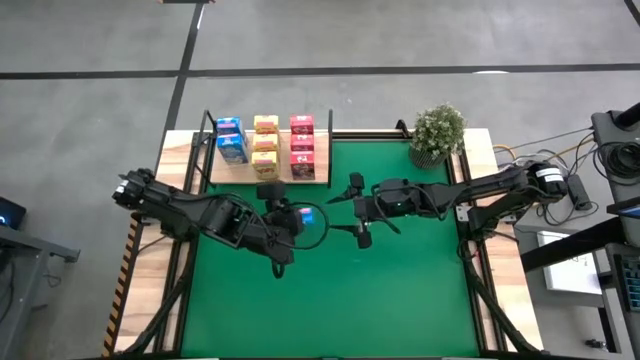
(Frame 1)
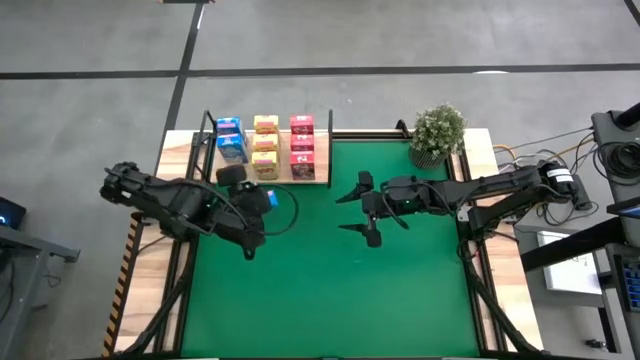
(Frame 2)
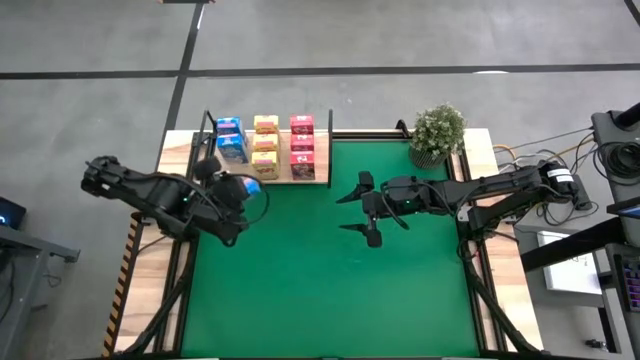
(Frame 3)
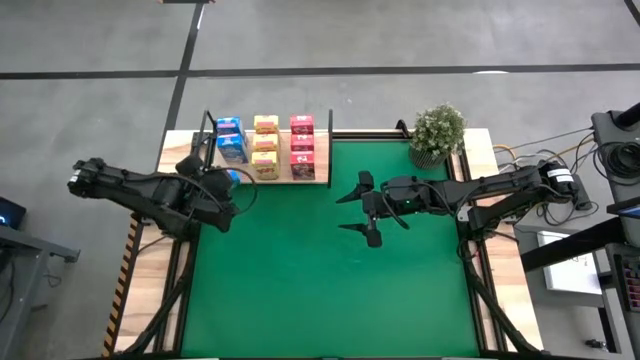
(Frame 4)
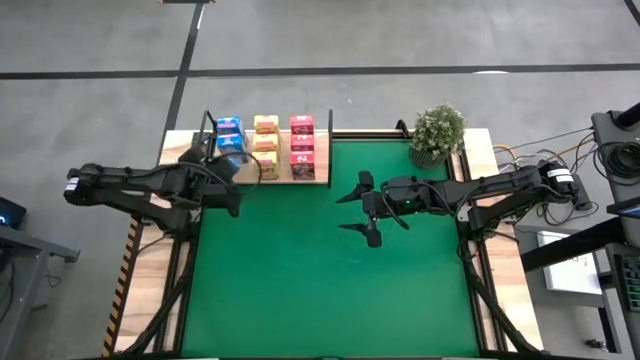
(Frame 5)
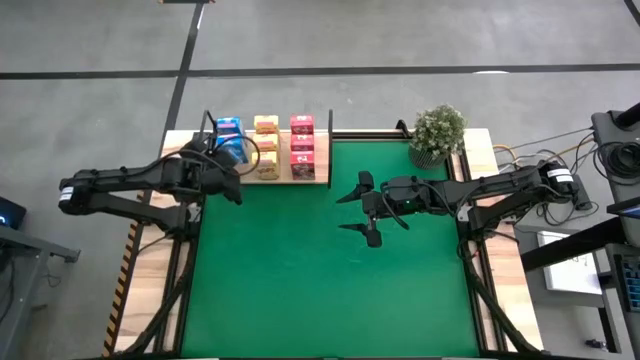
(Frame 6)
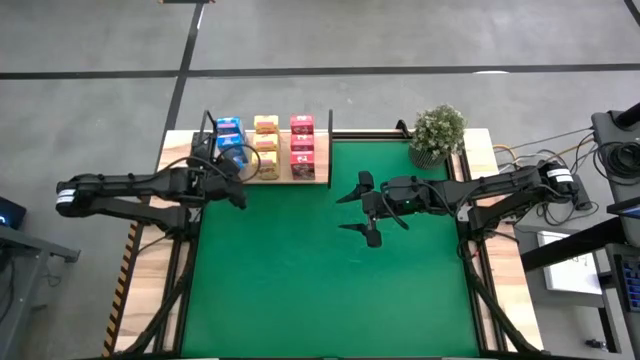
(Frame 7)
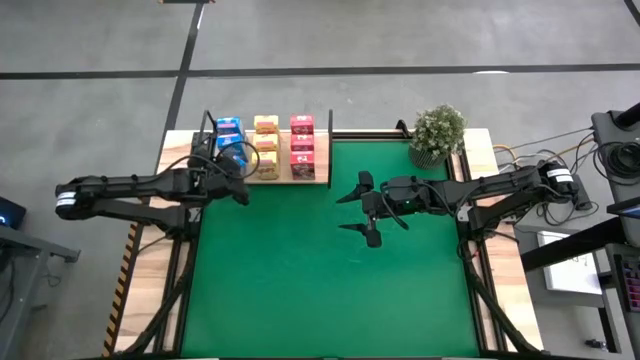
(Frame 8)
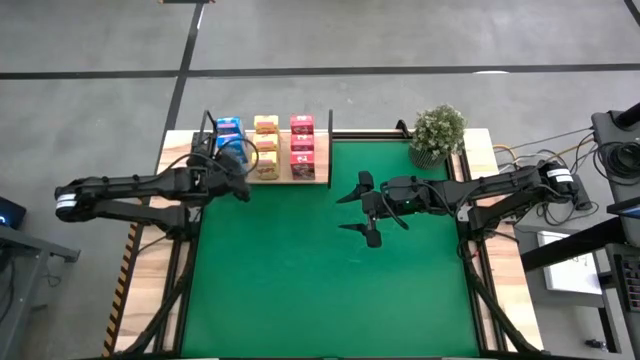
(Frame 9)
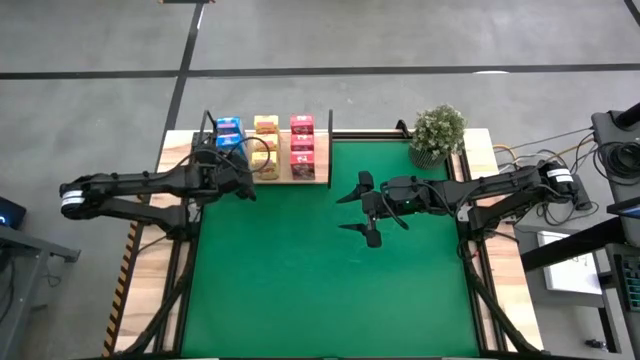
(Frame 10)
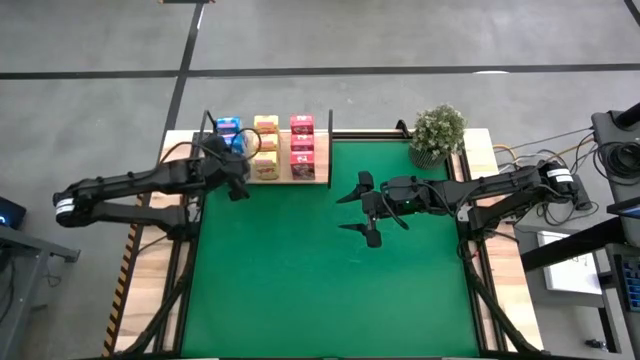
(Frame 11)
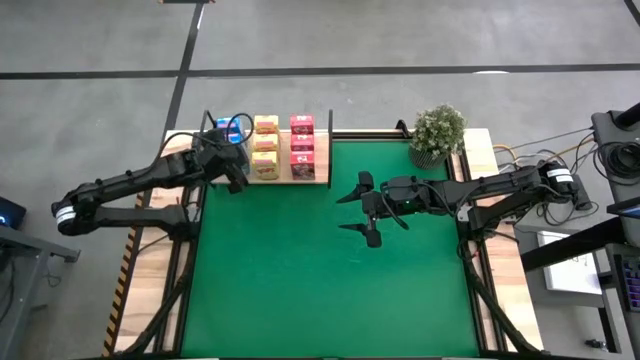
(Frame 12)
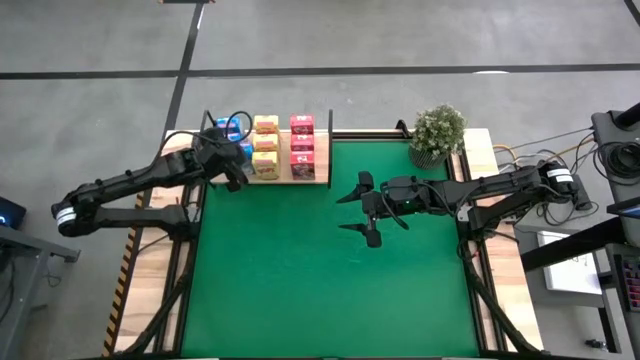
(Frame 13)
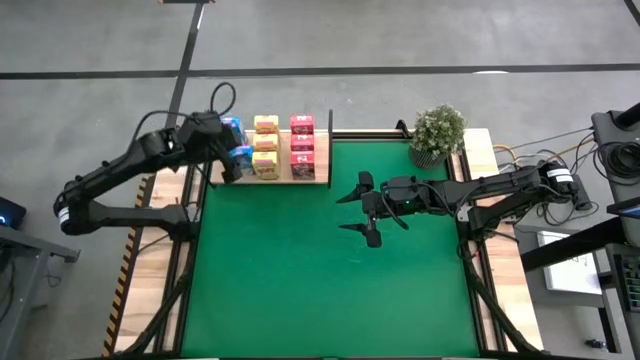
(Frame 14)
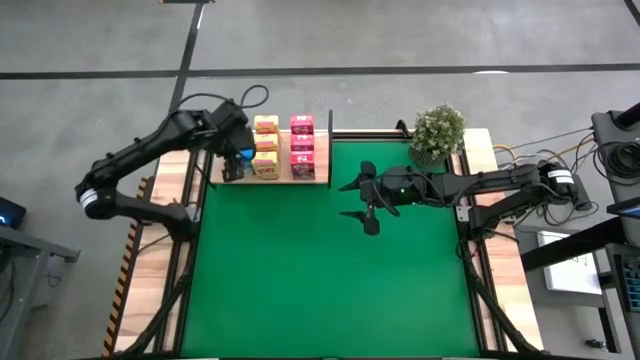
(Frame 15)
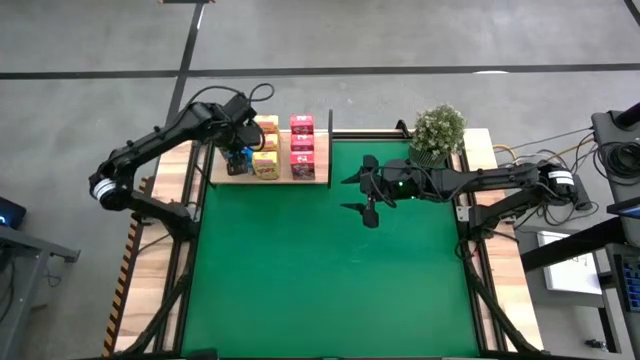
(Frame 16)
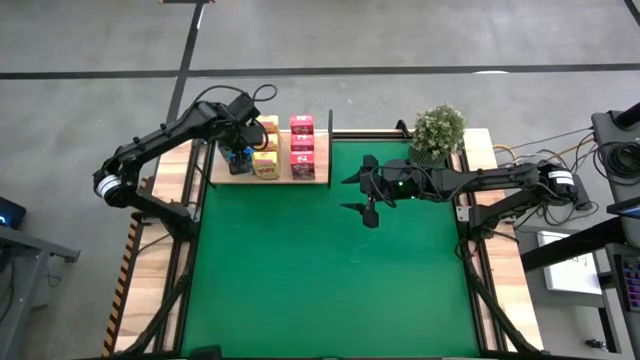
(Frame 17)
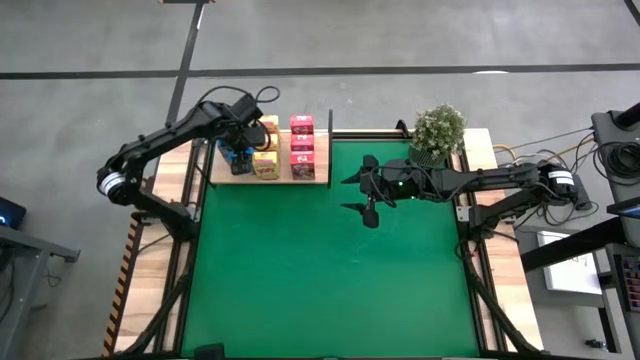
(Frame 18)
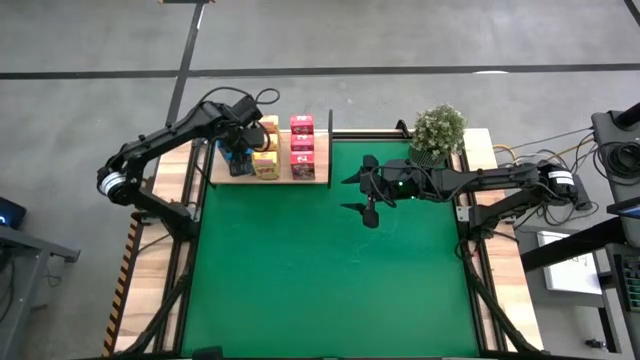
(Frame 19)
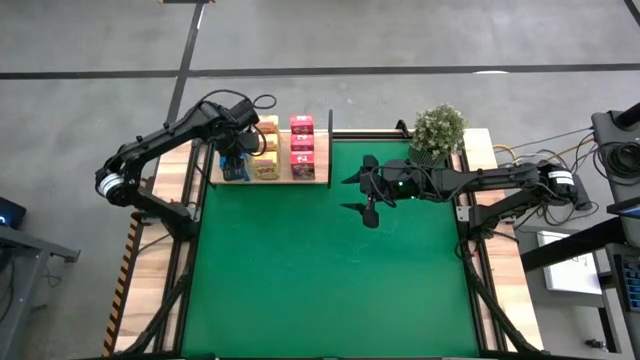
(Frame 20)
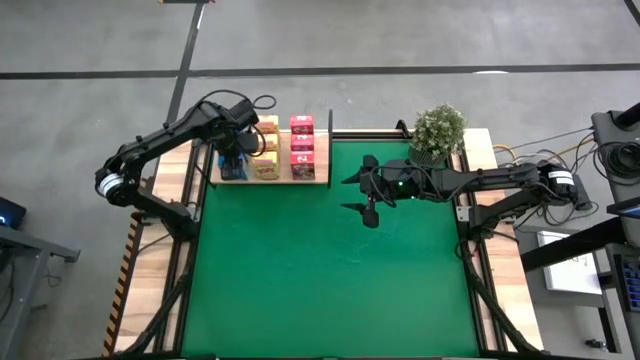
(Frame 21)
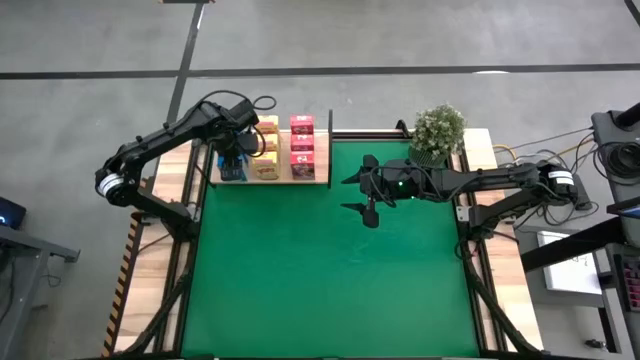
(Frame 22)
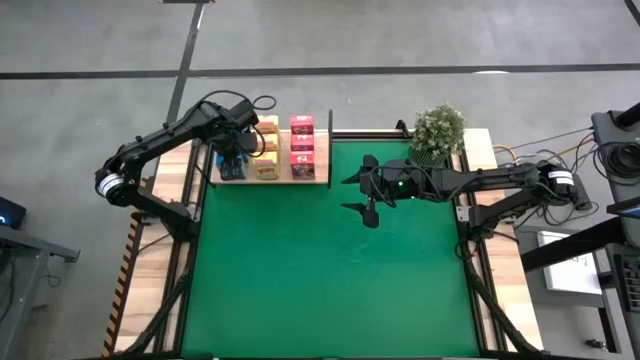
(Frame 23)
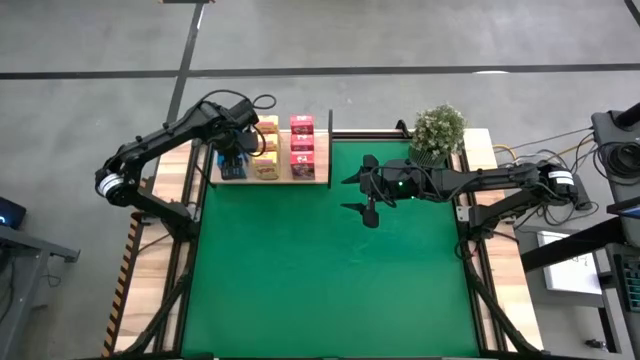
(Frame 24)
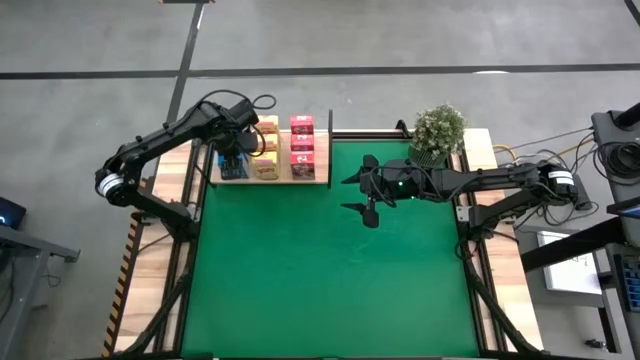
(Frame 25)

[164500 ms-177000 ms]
Task: Stack cereal on shelf
Put the blue cereal box aligned with the blue cereal box on the shelf

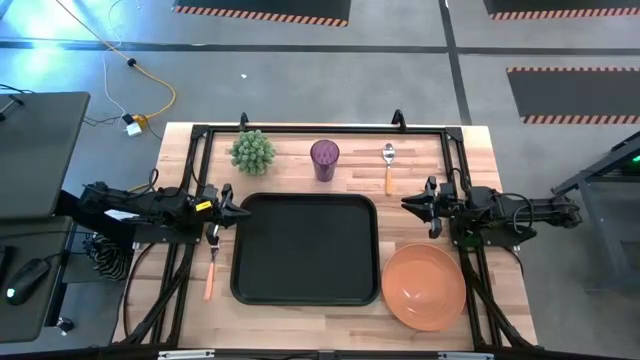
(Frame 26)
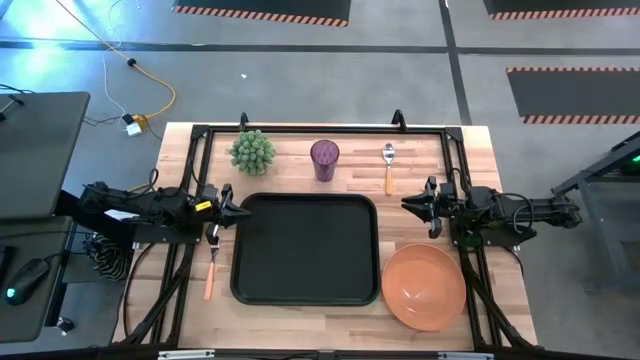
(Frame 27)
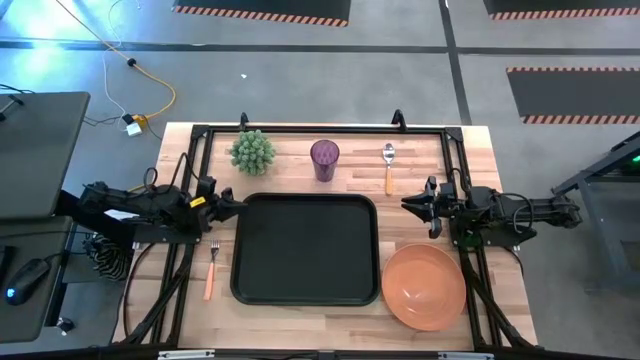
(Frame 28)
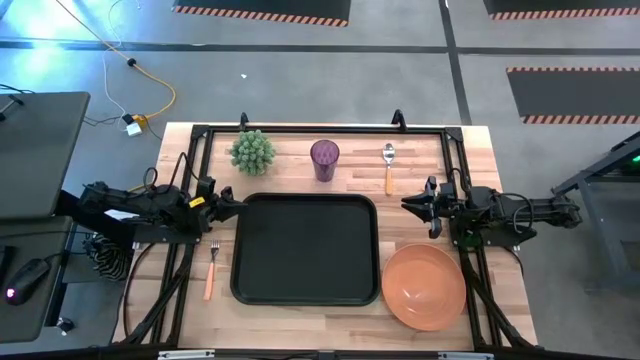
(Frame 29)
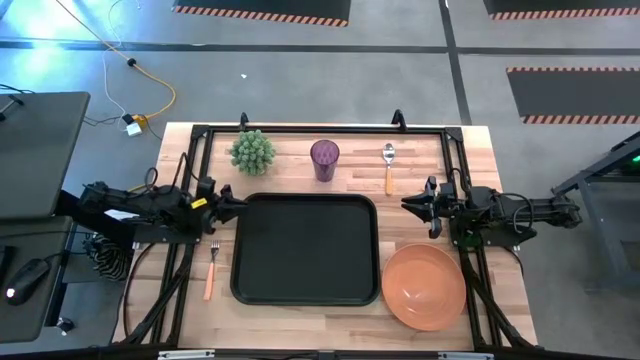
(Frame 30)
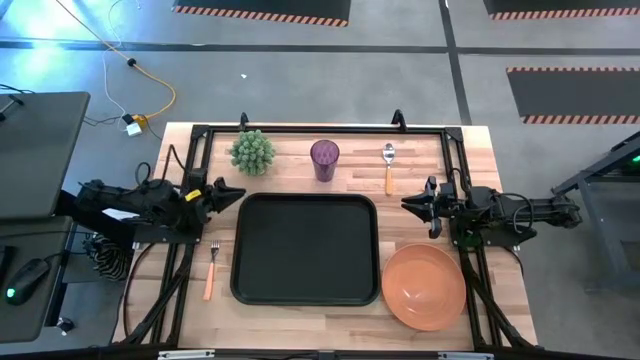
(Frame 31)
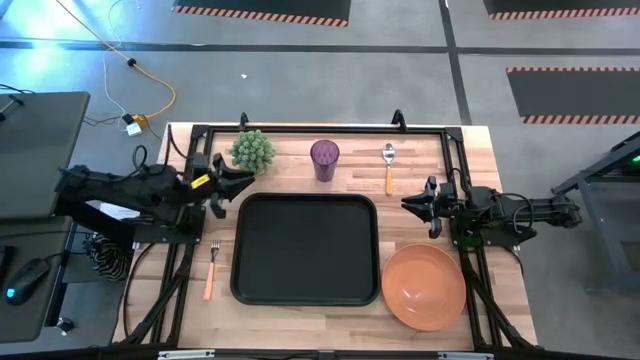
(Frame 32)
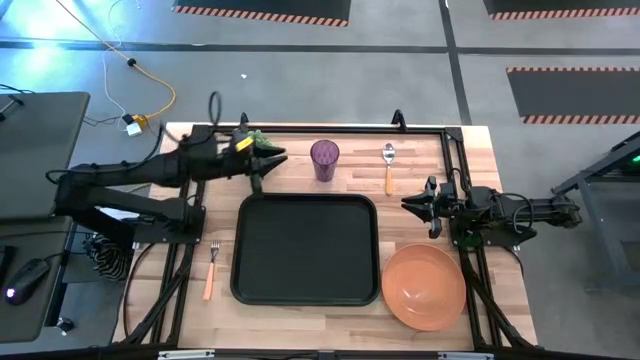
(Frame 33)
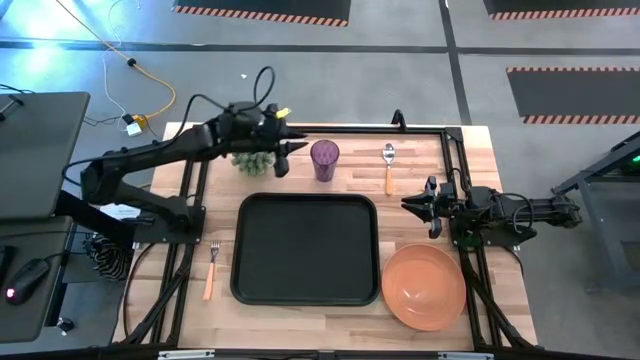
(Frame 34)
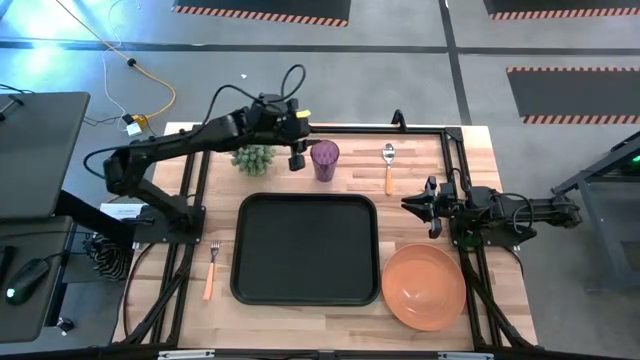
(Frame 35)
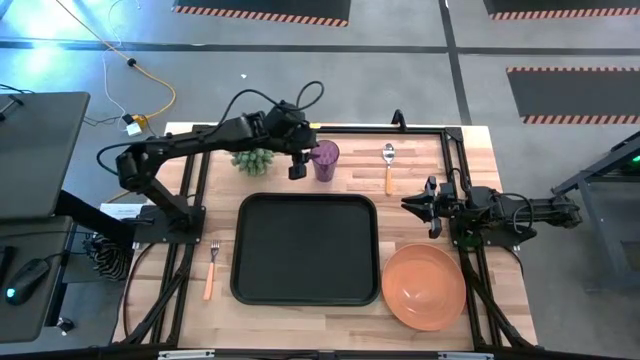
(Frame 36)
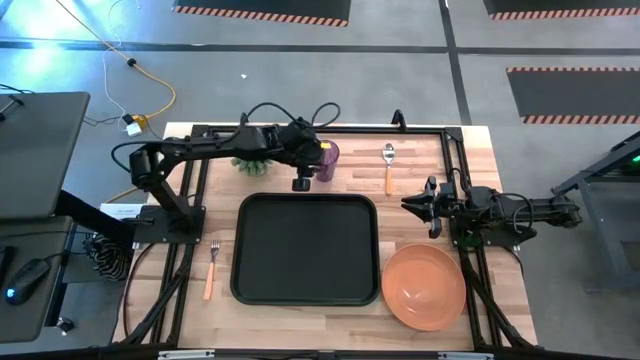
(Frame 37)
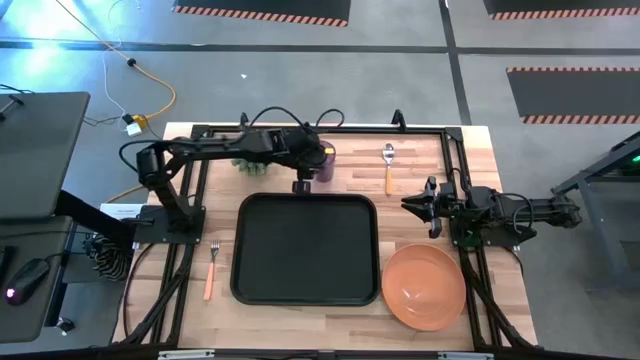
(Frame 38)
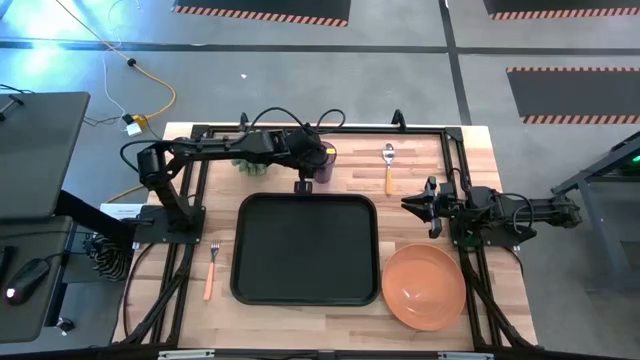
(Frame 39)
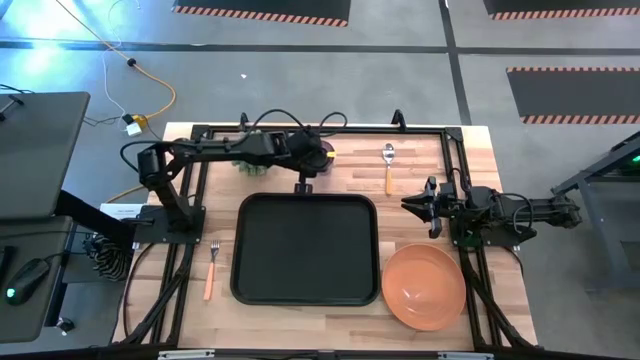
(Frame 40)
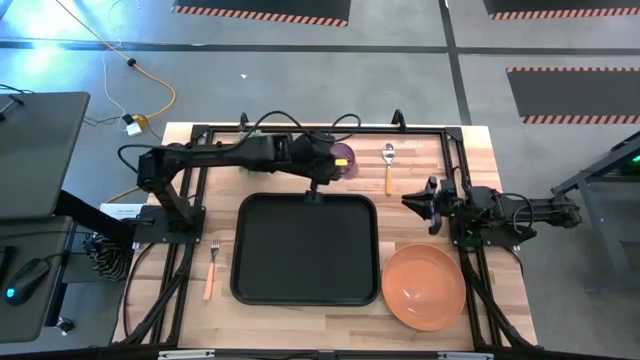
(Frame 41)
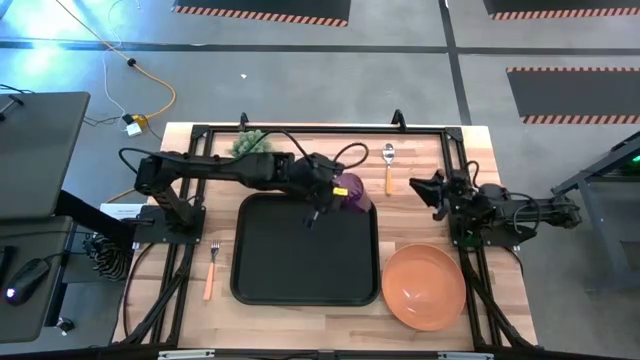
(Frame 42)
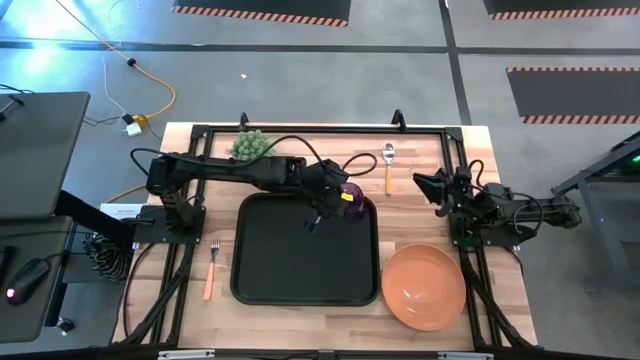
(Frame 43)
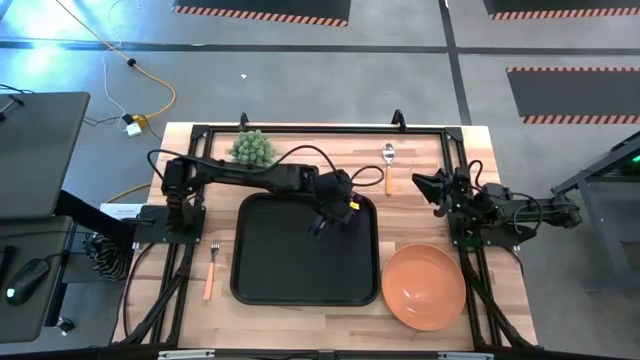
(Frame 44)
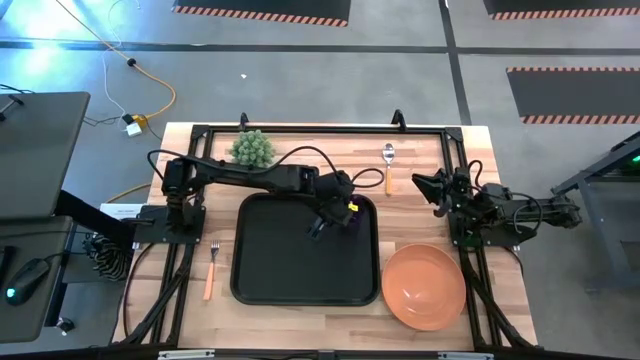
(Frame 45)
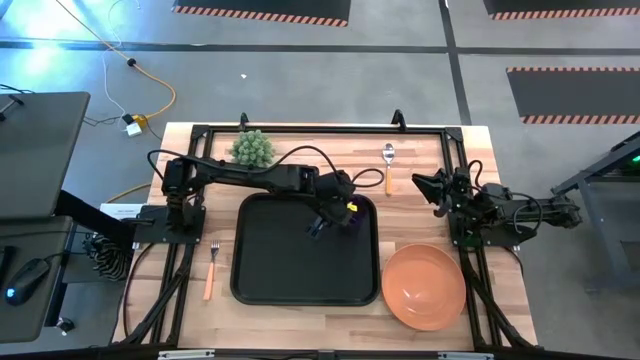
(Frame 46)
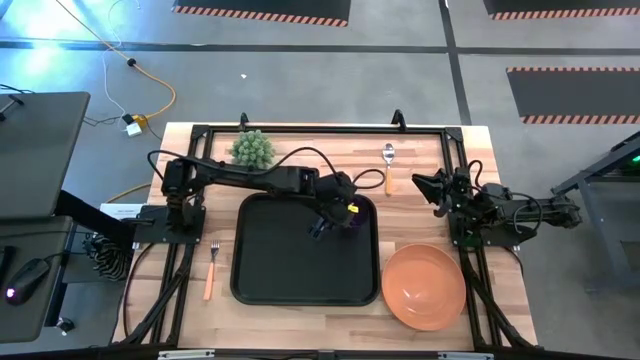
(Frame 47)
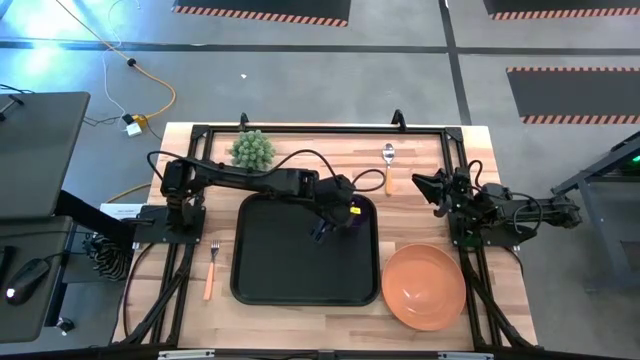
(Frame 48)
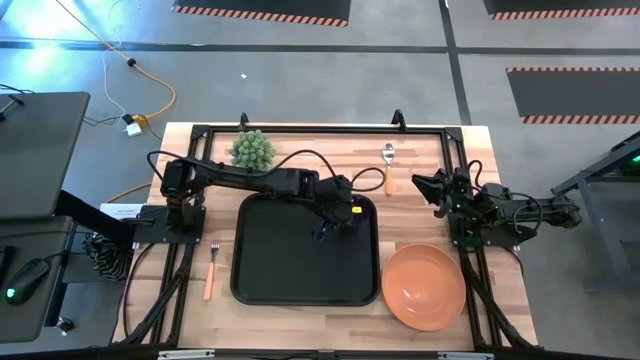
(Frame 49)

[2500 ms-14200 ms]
Task: Pick and place plate/cup/fork/spoon on tray
Put the purple cup on the top right of the black tray
